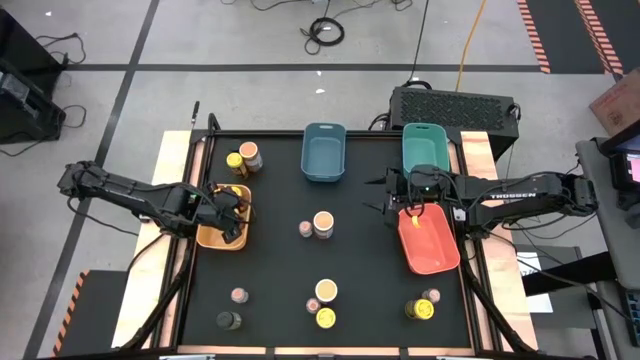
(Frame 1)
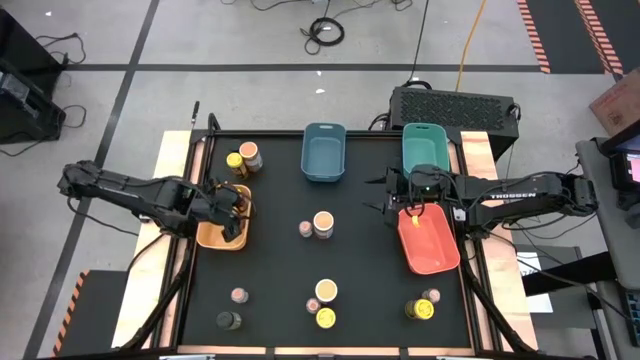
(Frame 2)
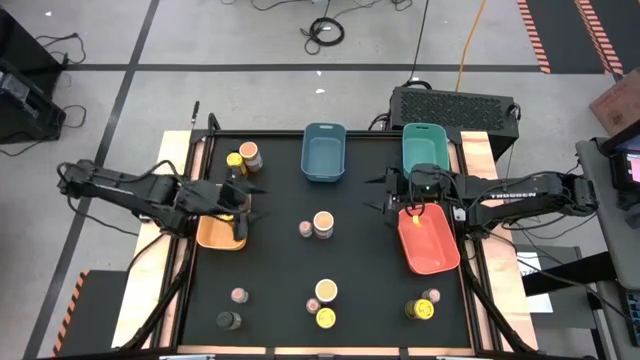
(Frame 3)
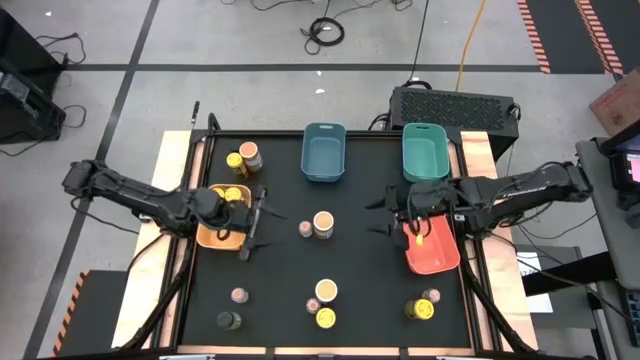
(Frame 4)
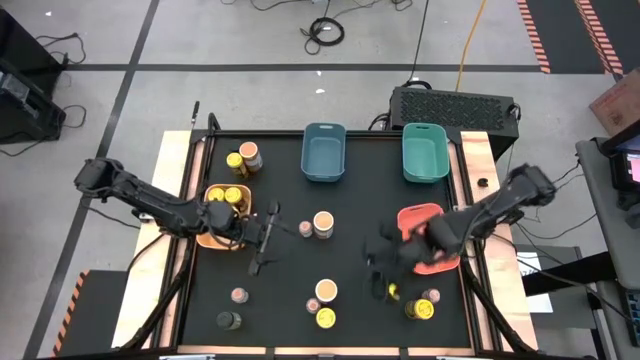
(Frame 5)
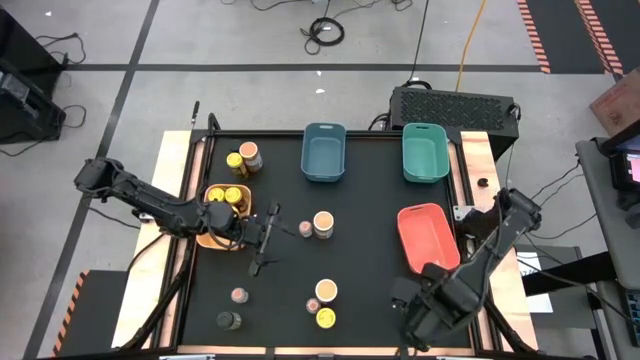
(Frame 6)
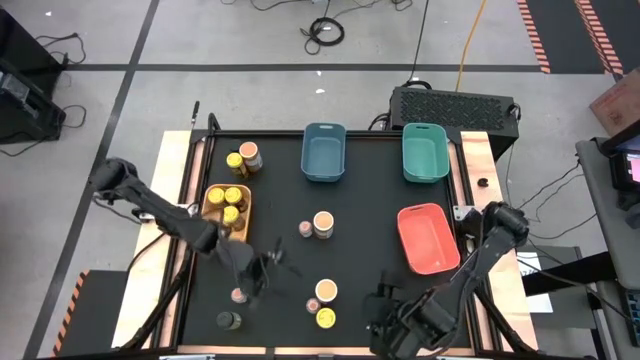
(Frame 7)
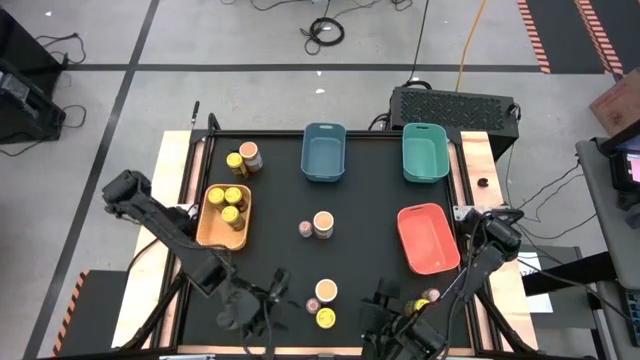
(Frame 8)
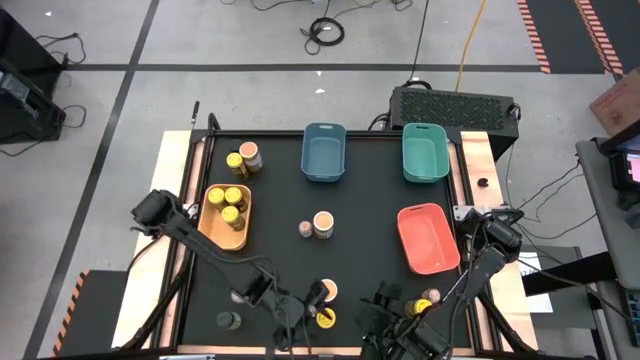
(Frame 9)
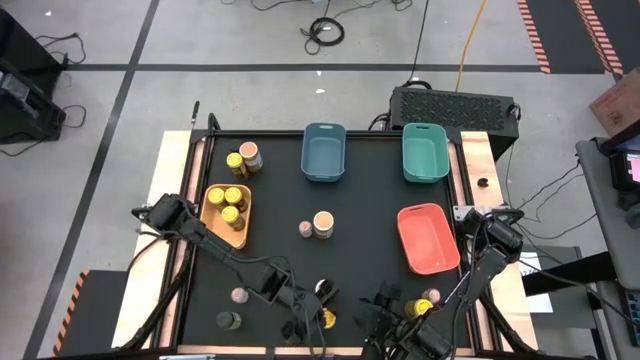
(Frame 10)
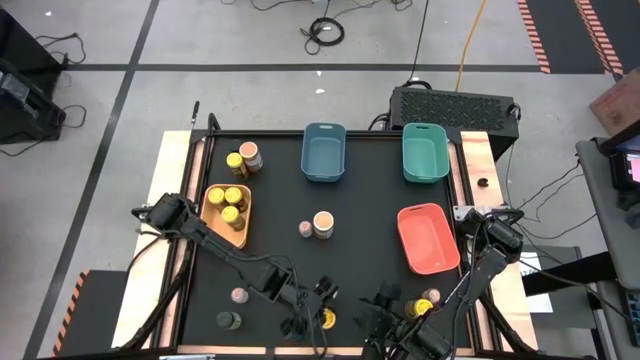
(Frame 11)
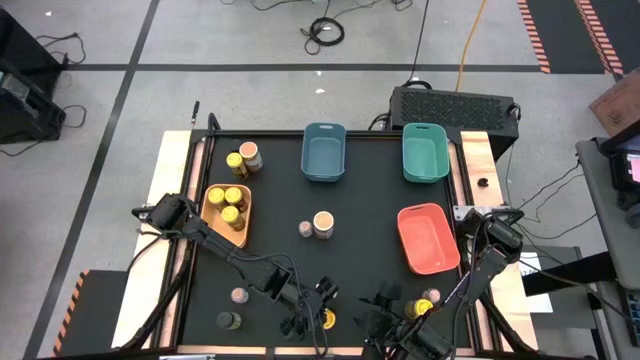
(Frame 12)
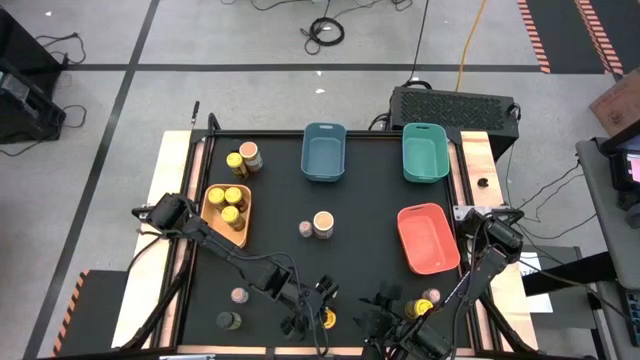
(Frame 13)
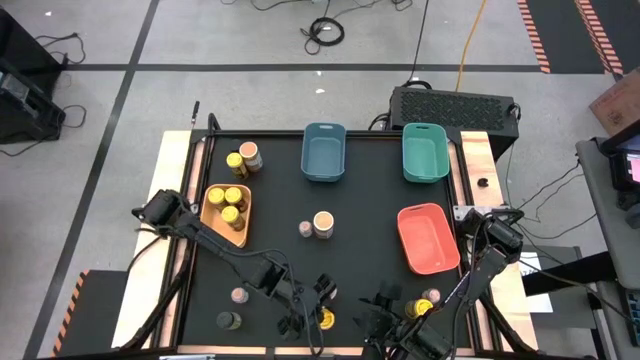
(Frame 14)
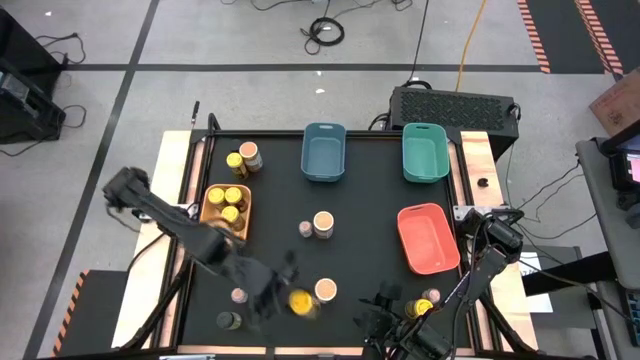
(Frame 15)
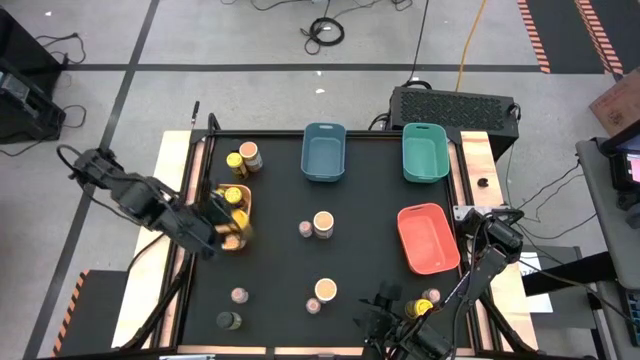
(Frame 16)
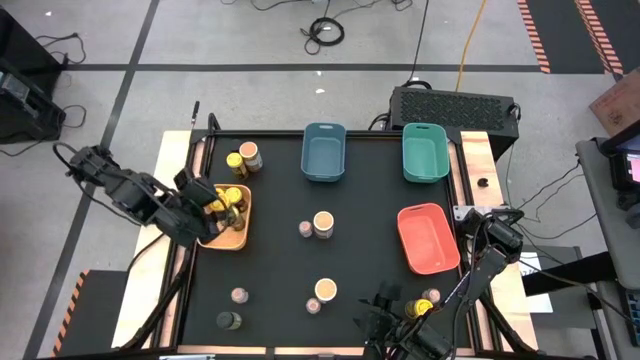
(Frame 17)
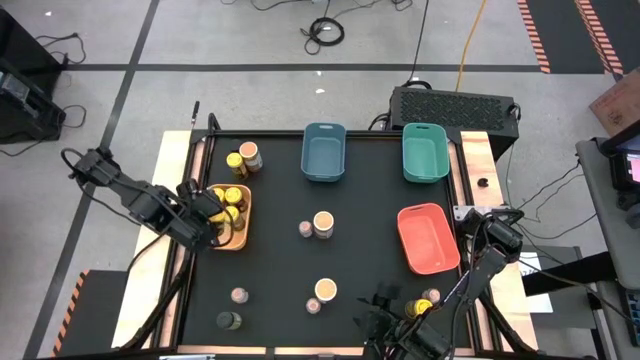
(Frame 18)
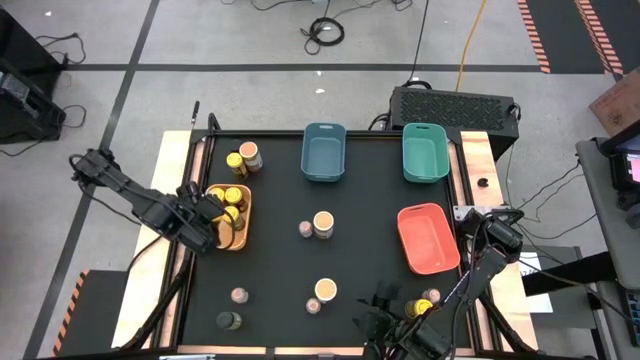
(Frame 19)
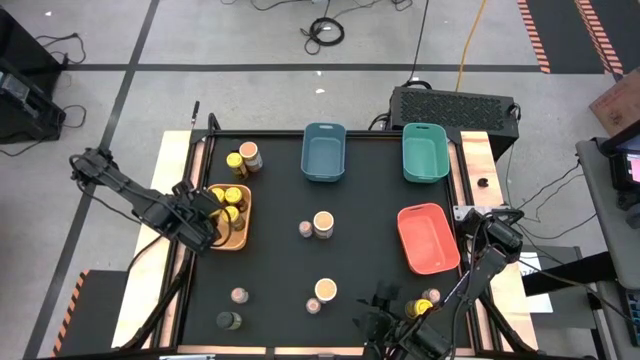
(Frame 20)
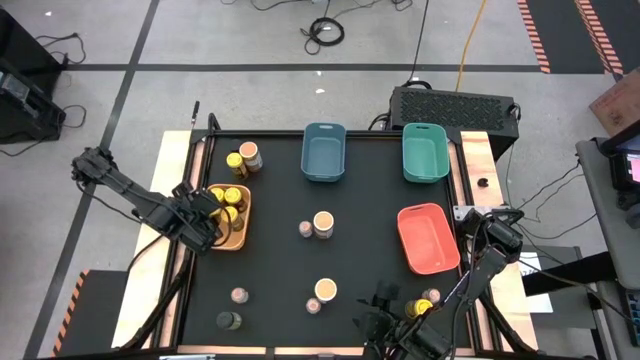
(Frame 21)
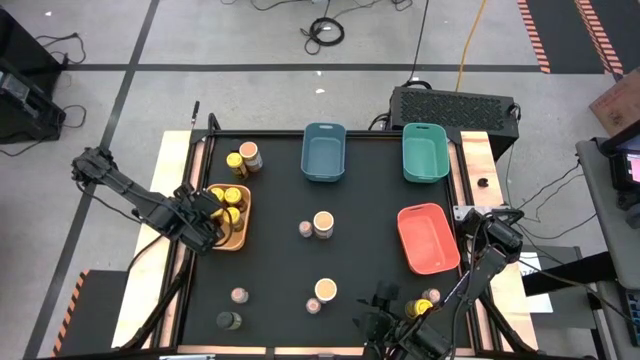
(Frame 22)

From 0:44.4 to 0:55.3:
Task: Sort spices by type
Put the yellow seasoning can into the yellow bin

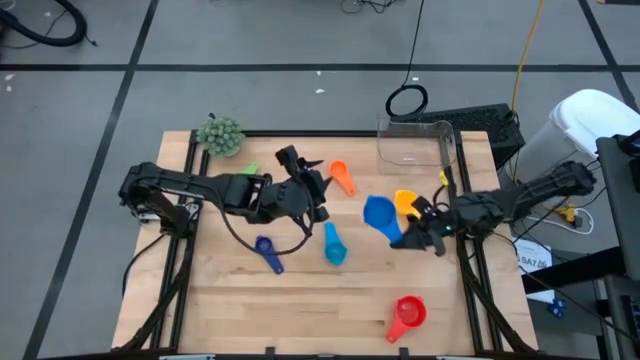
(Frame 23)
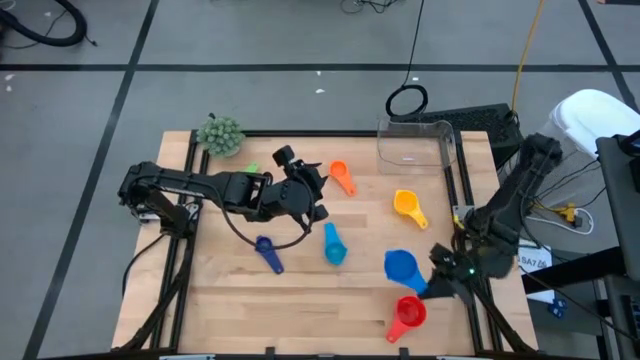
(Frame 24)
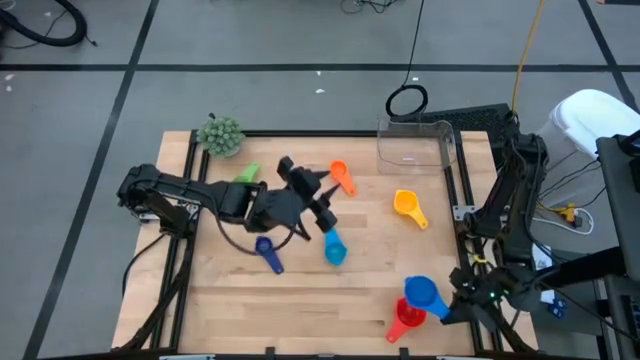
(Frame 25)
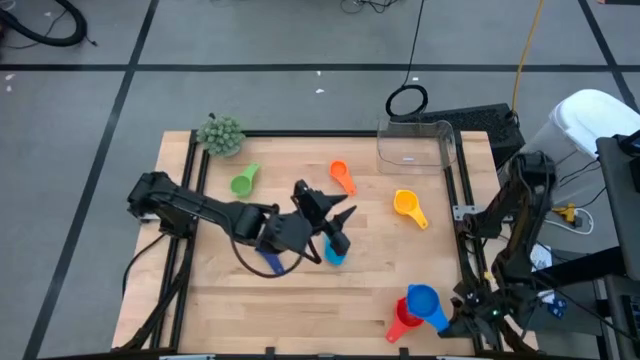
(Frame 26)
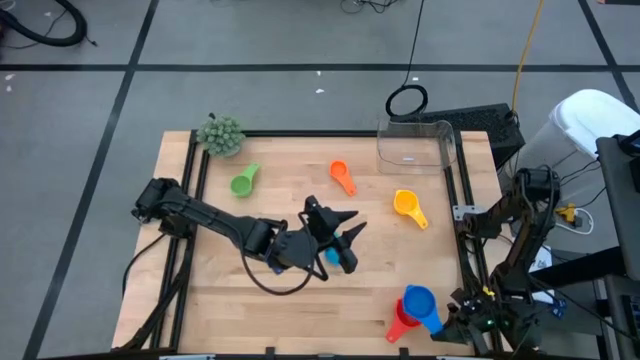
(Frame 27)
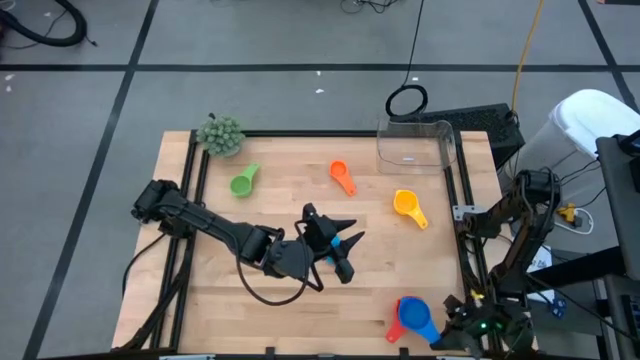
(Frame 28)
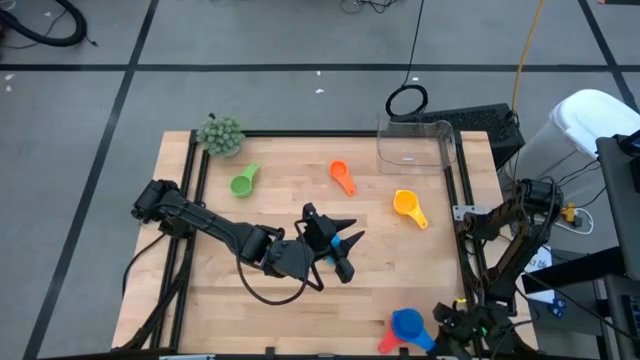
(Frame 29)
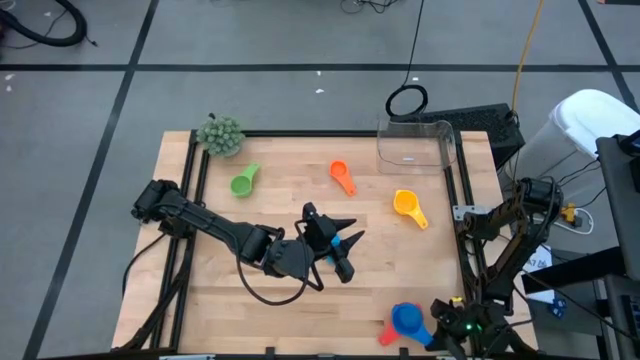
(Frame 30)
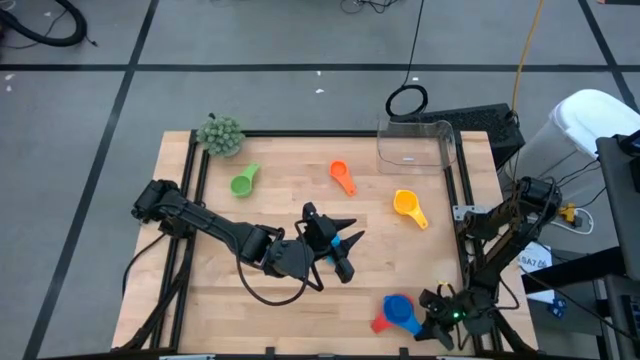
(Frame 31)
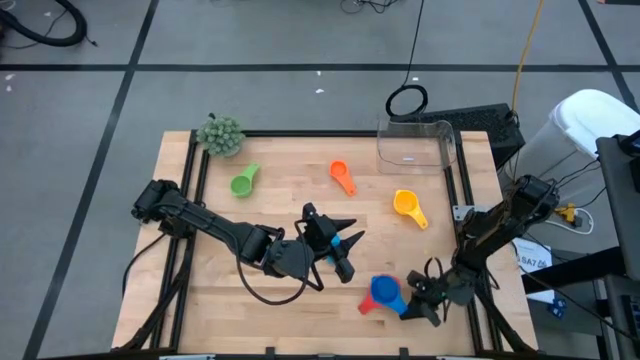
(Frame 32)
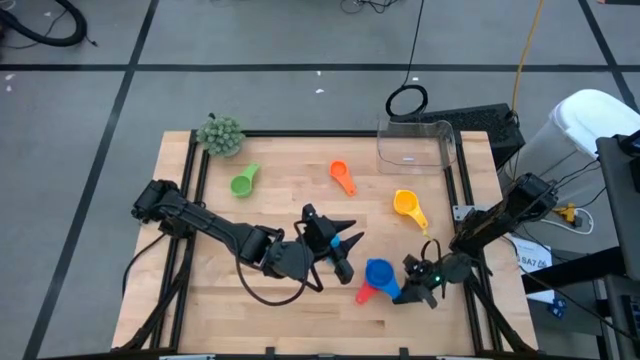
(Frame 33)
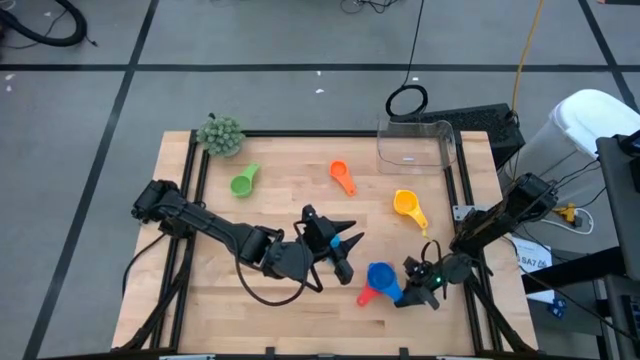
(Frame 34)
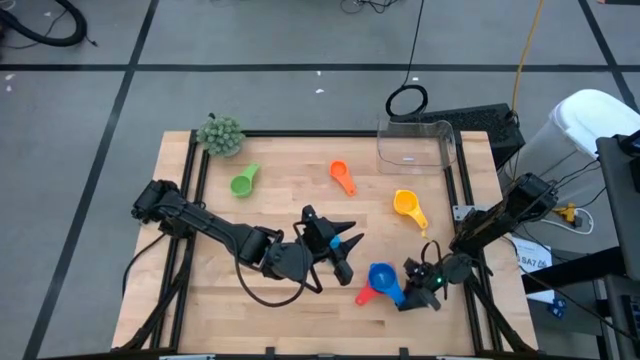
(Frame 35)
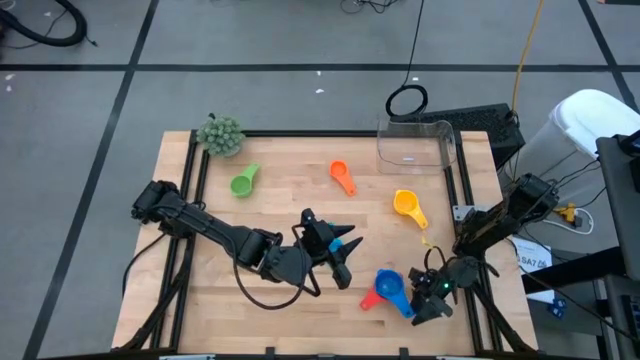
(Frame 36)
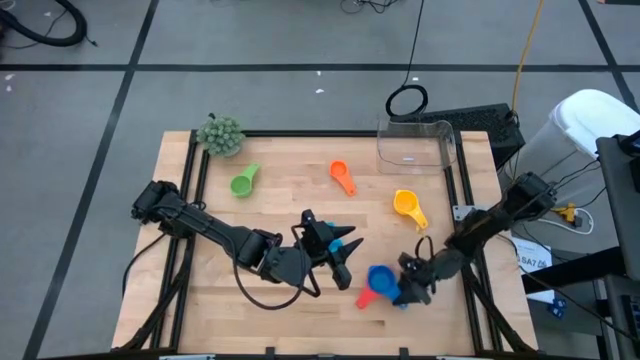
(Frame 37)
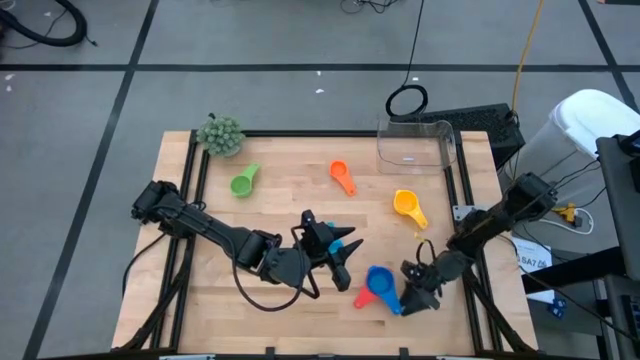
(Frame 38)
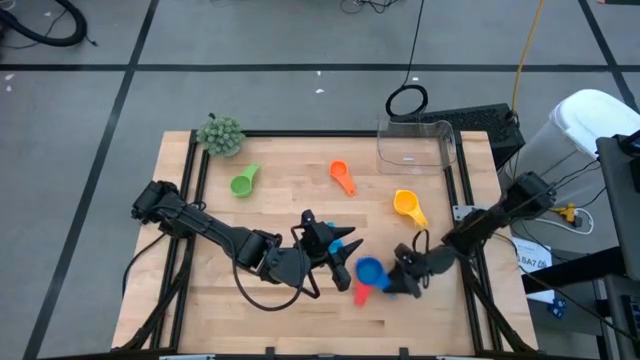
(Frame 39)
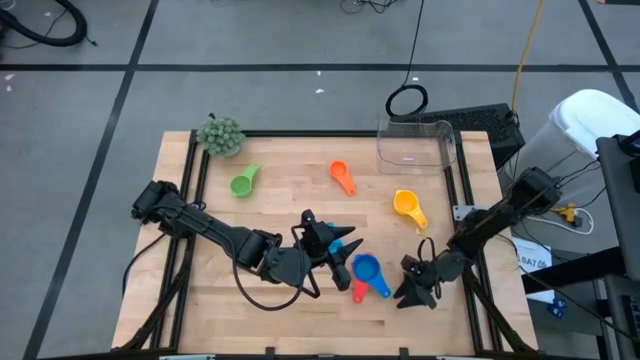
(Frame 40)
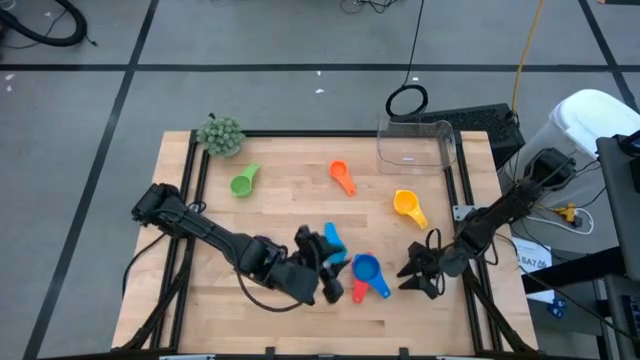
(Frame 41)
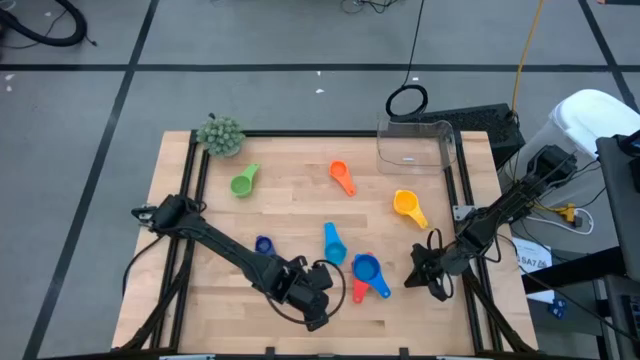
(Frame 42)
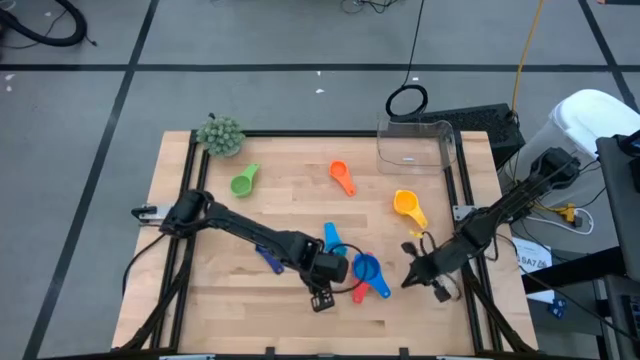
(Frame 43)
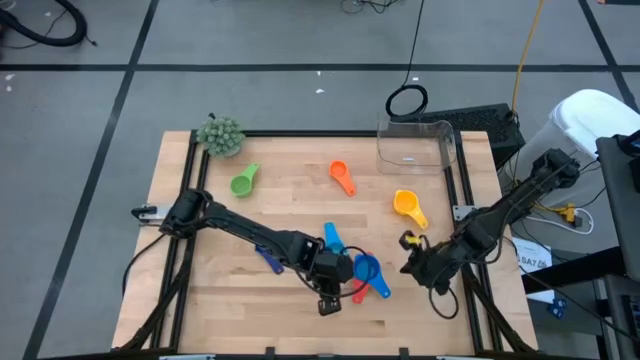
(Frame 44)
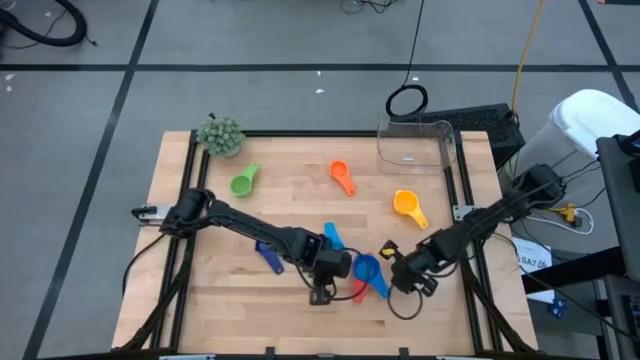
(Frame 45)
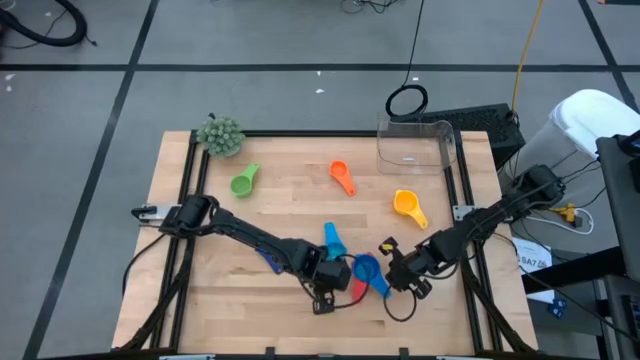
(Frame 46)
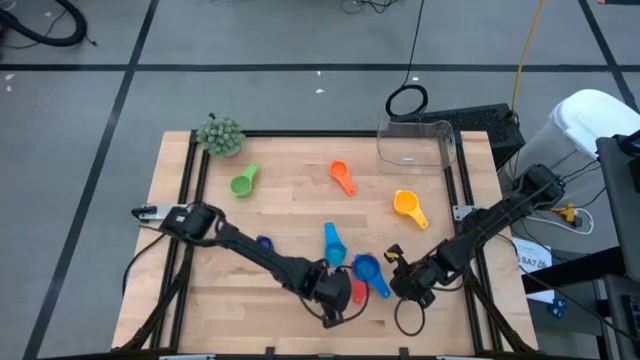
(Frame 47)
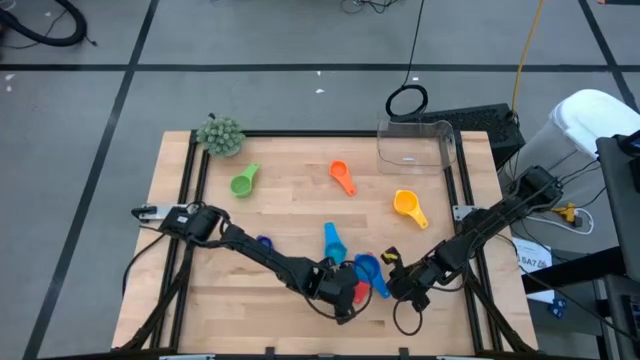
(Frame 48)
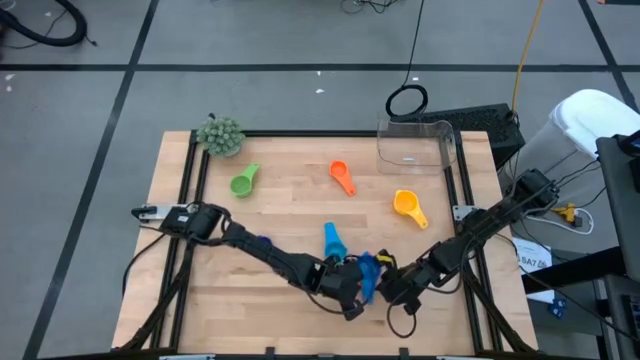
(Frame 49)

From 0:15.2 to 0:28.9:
Task: Nest measuring cups in basket
Stack the blue measuring cup on top of the red measuring cup
